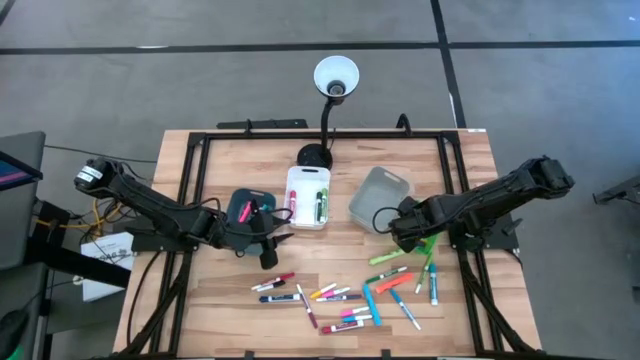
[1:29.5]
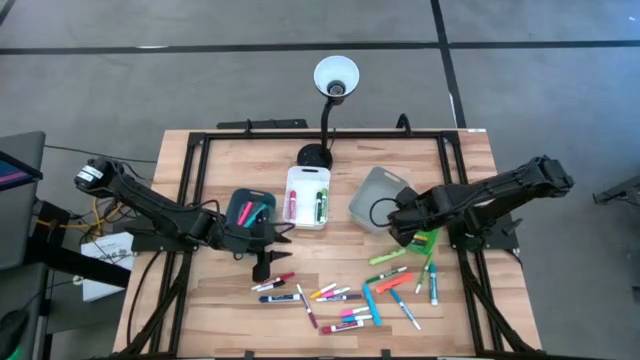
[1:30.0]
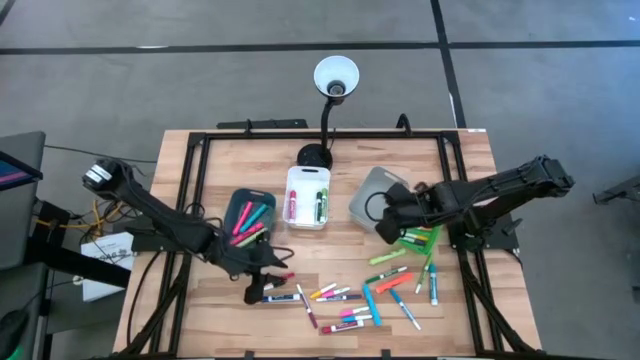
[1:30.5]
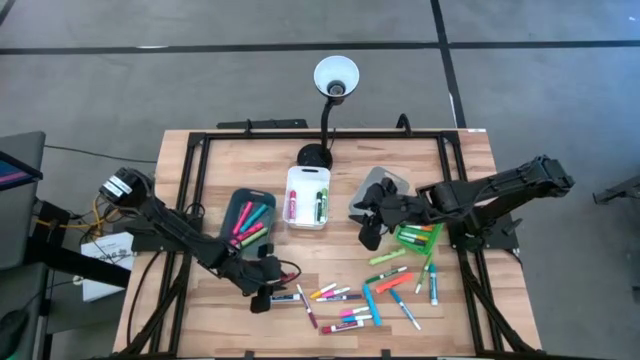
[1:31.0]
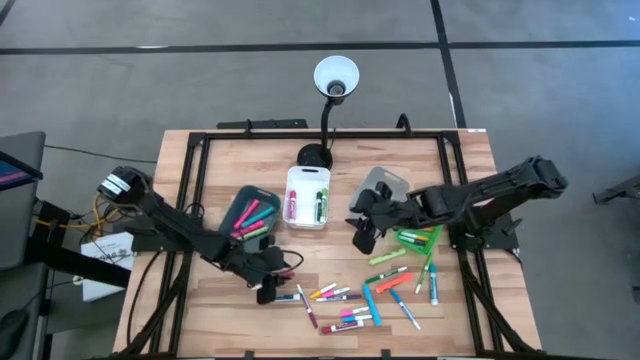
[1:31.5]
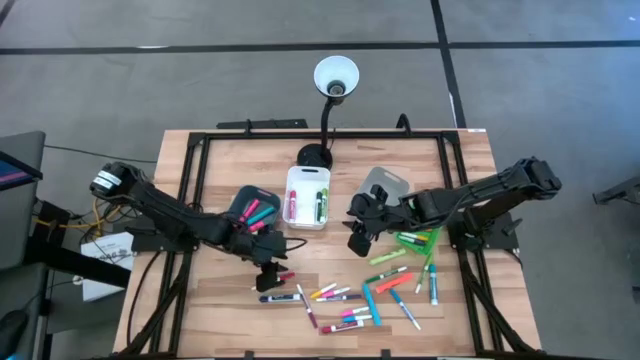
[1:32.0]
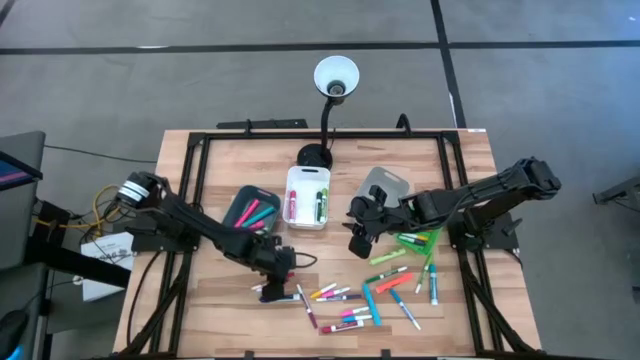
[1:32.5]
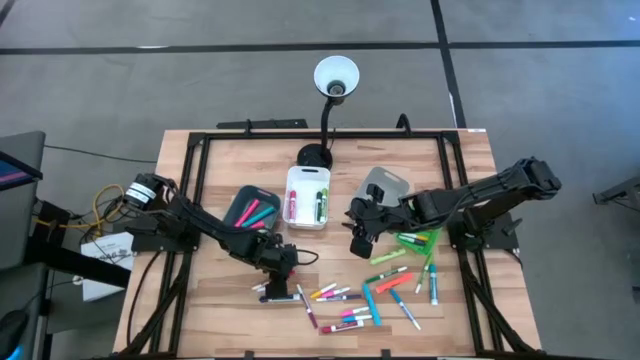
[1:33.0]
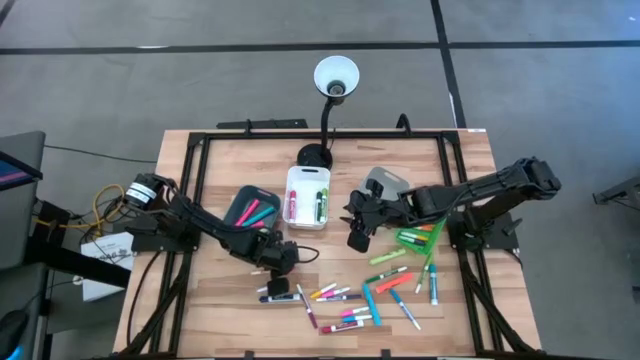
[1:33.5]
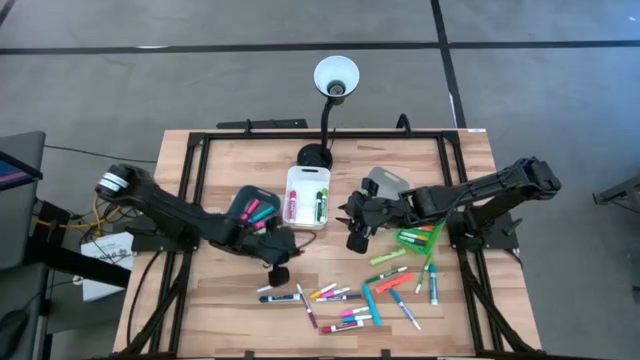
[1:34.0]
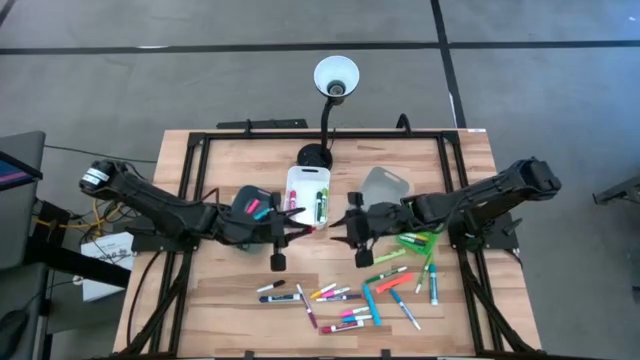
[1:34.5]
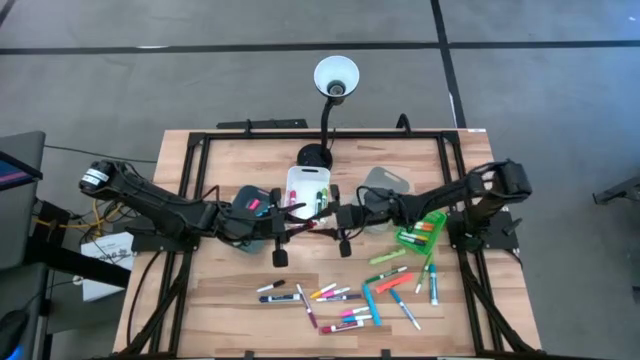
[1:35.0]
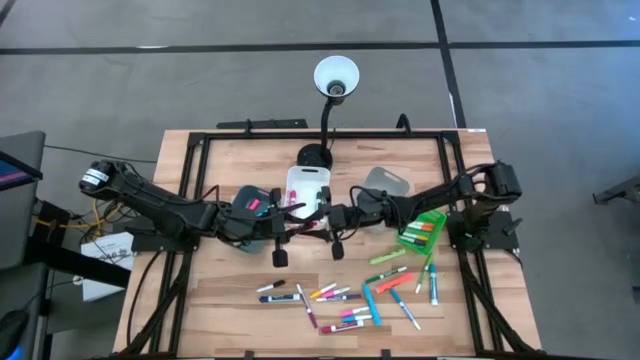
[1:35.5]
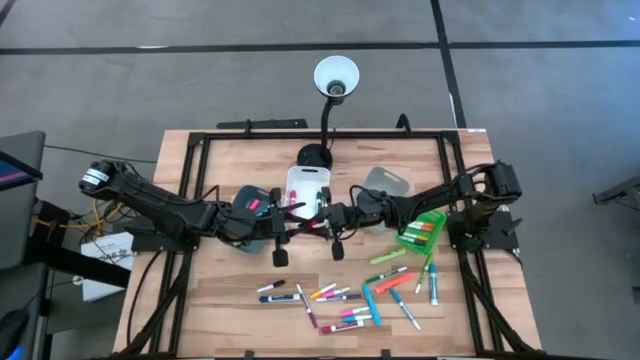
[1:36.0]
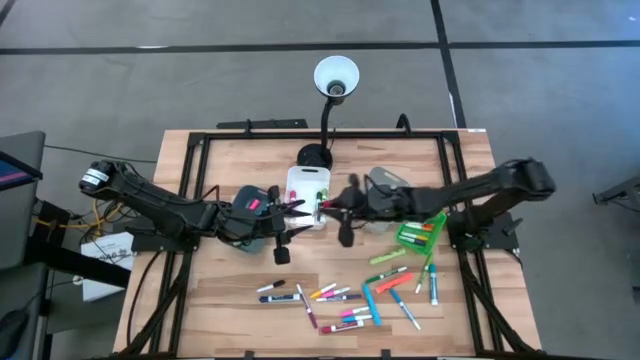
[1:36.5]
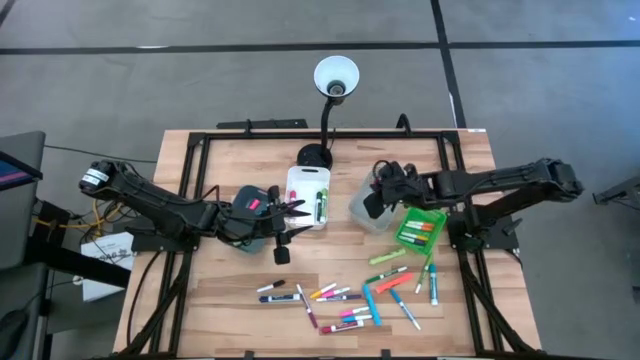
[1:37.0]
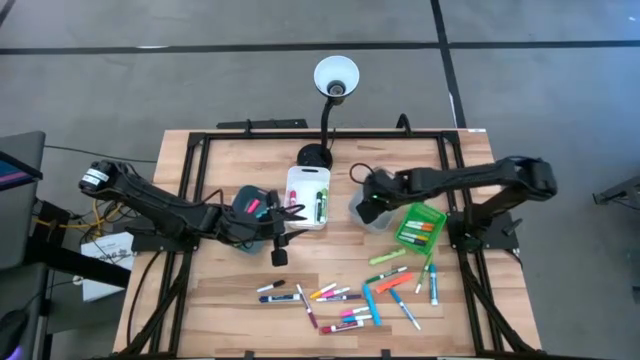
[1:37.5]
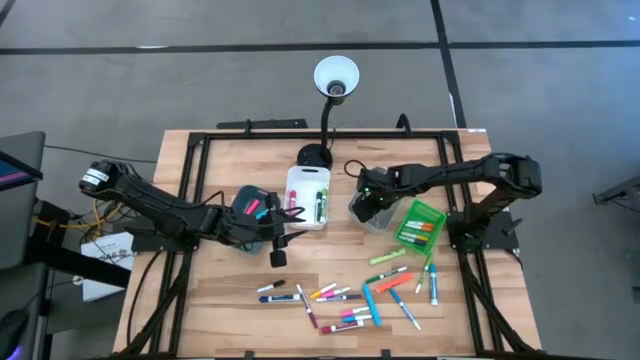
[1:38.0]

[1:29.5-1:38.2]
Task: Pick & Place Markers
Put the red mini dry erase marker into the gray bin

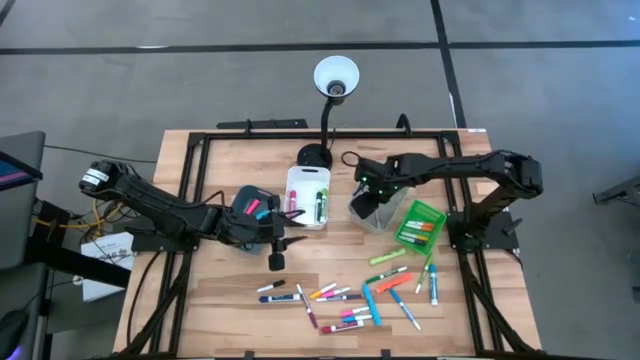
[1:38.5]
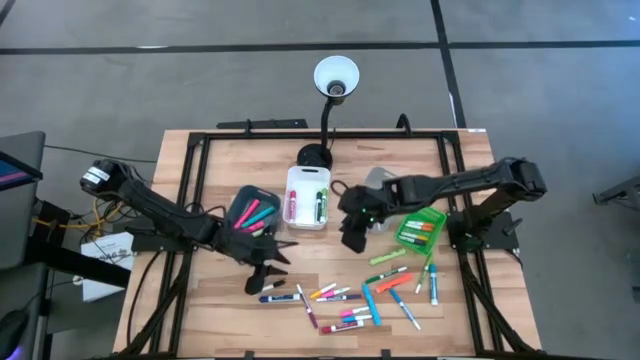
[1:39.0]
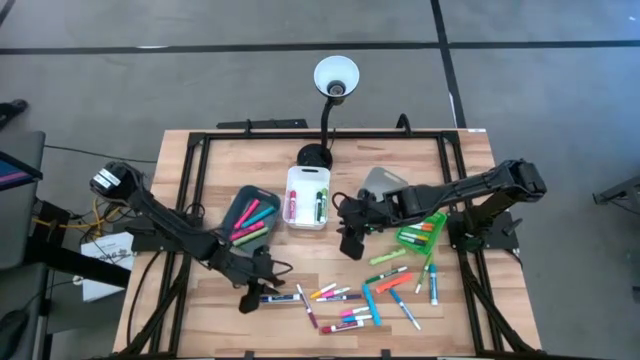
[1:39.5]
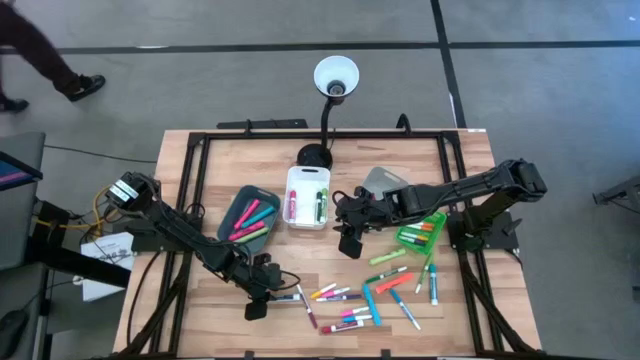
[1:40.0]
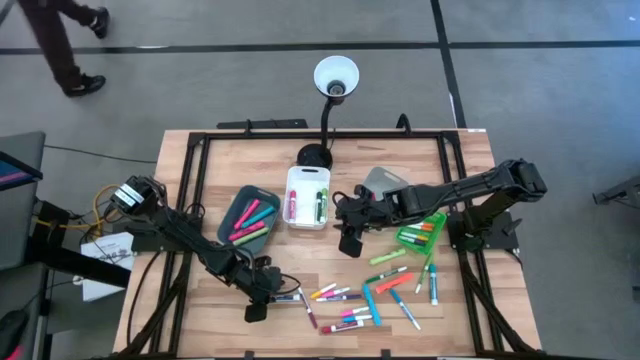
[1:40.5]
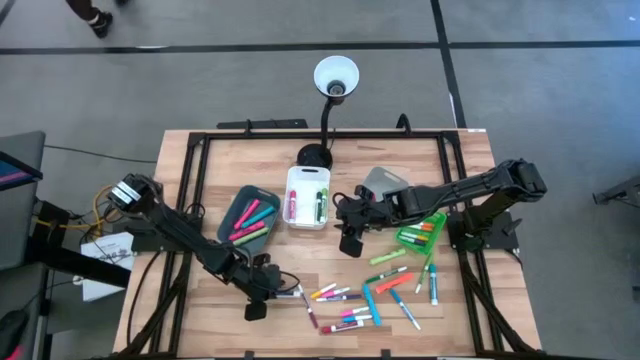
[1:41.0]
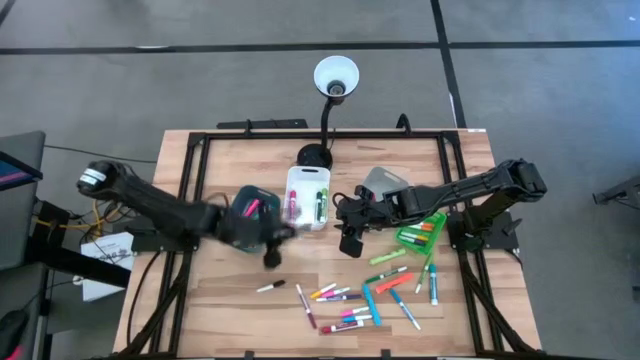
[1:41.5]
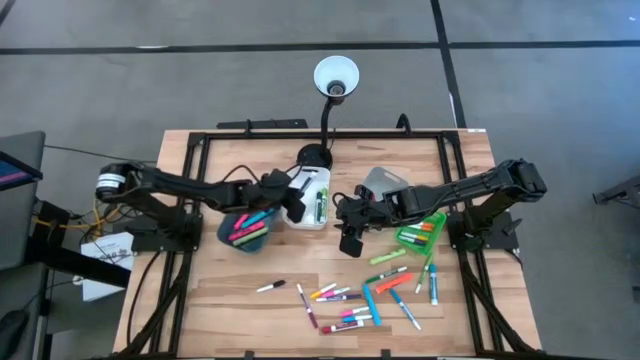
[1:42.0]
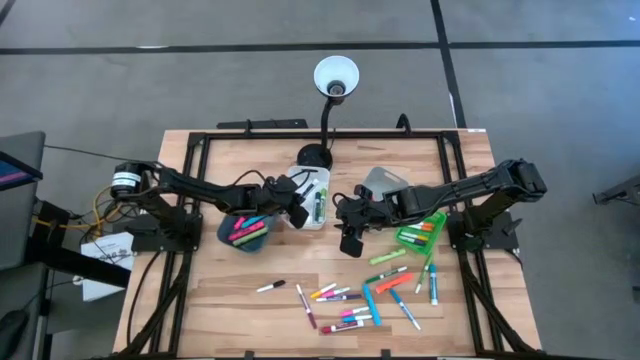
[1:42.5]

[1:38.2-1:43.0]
Put the blue dry erase marker into the white bin

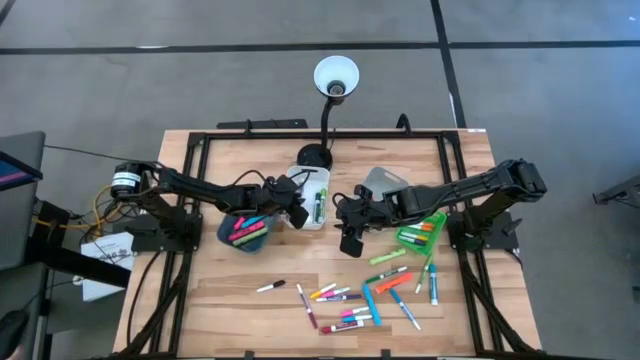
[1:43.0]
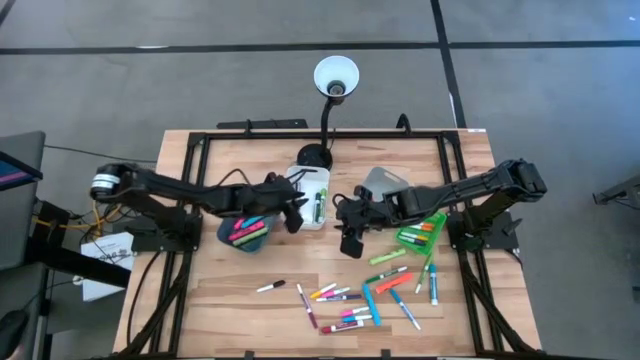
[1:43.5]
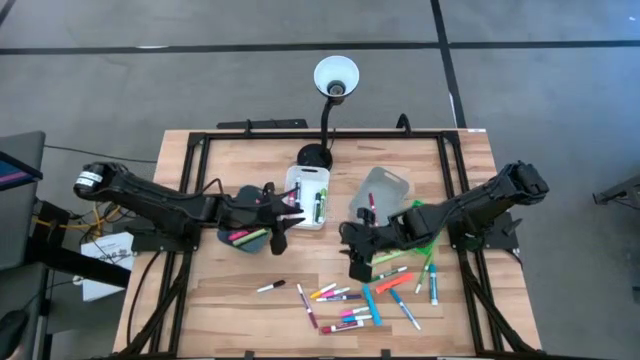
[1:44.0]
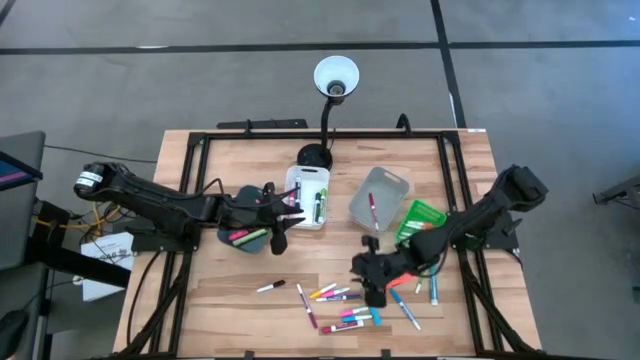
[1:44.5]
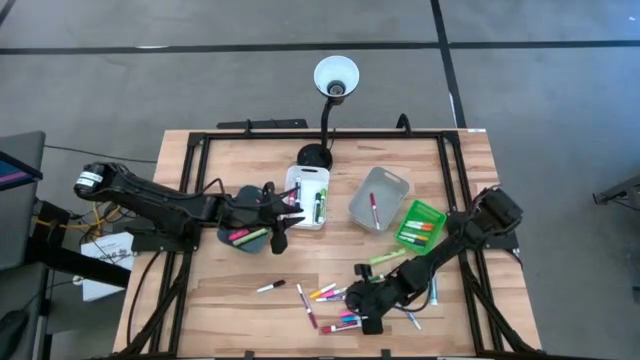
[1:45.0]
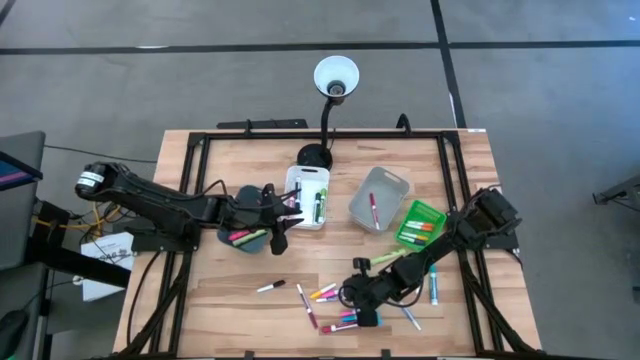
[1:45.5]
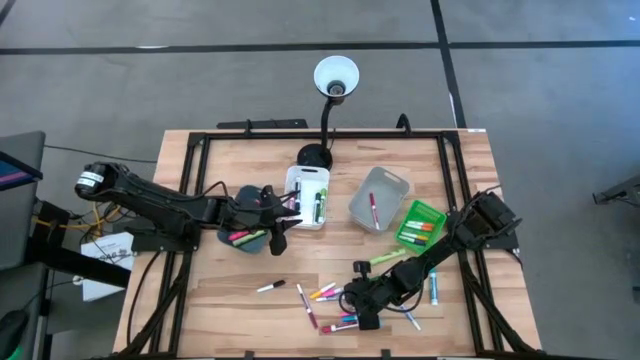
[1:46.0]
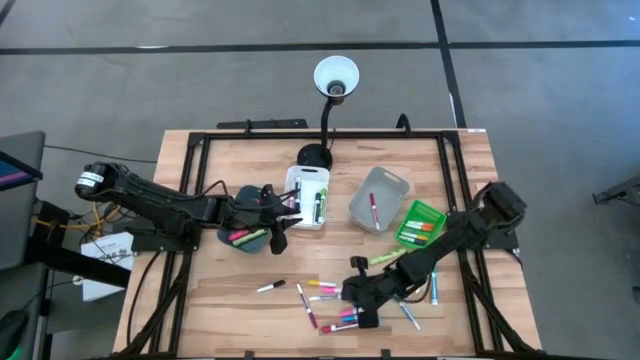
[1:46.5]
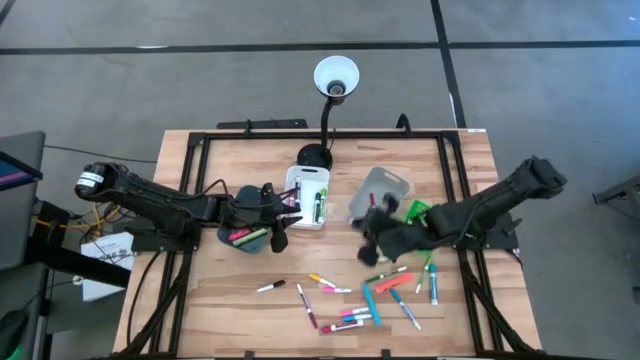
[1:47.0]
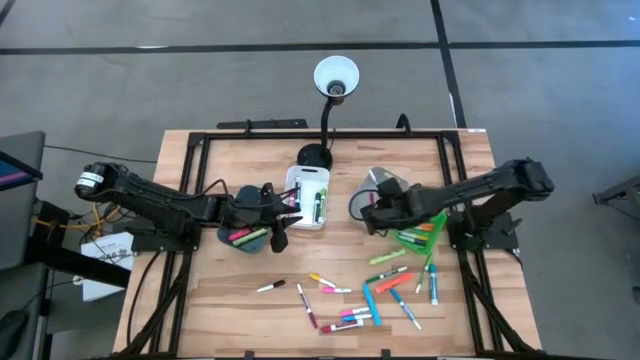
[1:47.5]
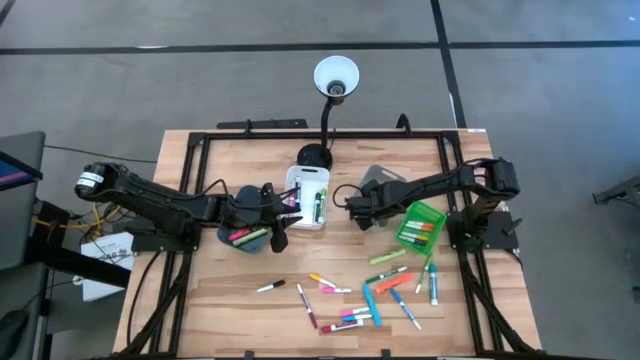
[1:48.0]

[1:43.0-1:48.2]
Put the violet mini dry erase marker into the gray bin
